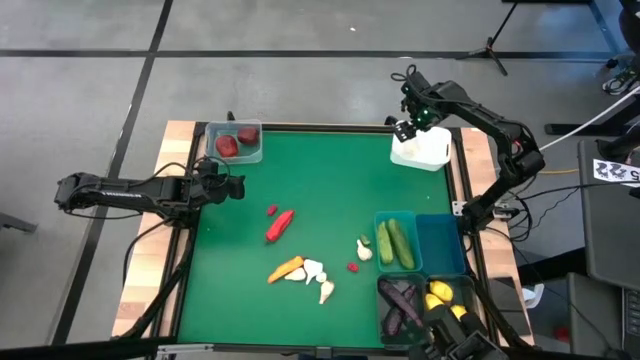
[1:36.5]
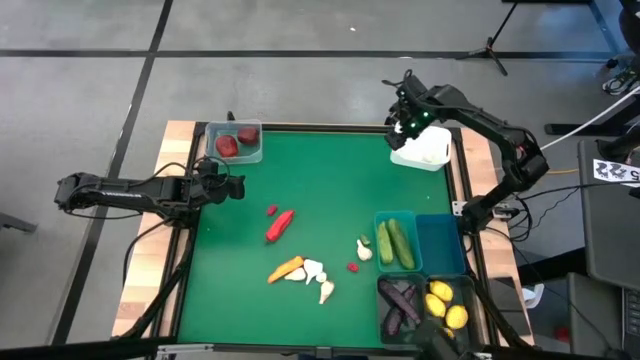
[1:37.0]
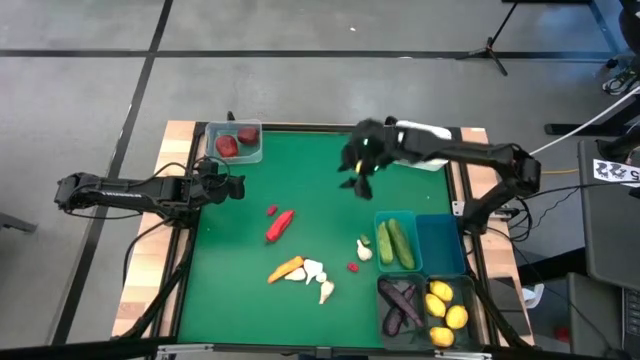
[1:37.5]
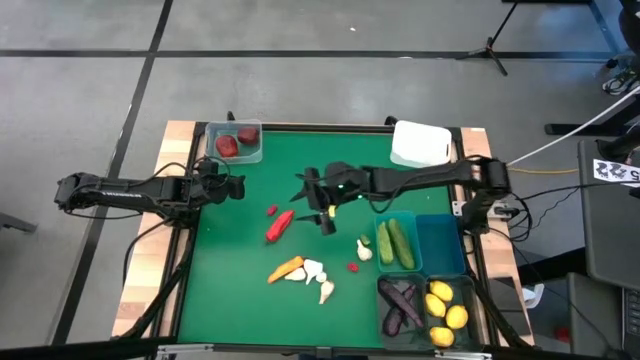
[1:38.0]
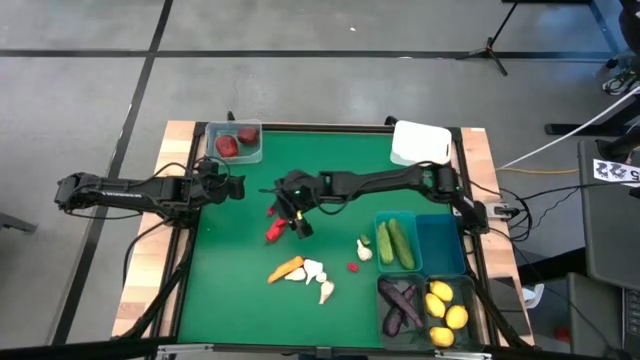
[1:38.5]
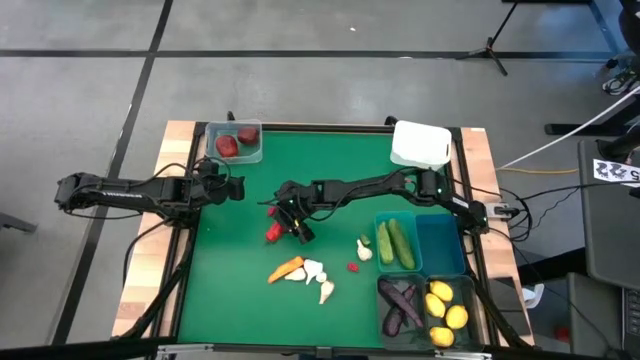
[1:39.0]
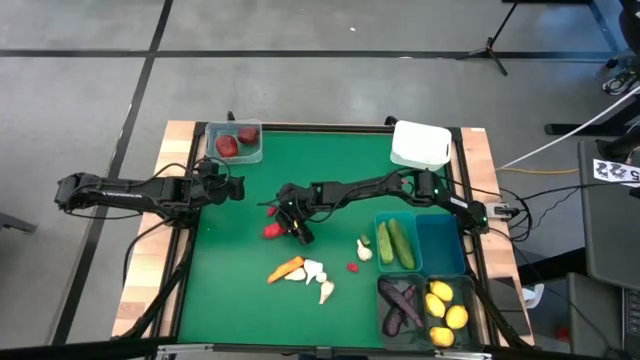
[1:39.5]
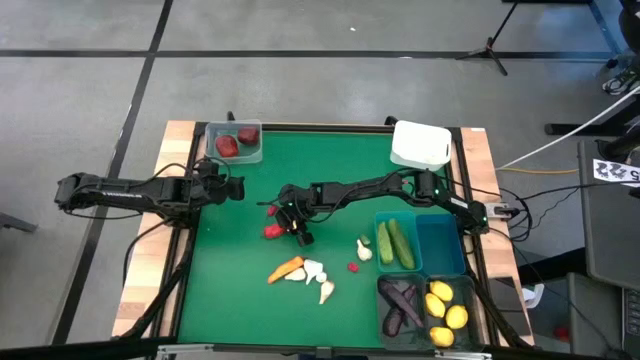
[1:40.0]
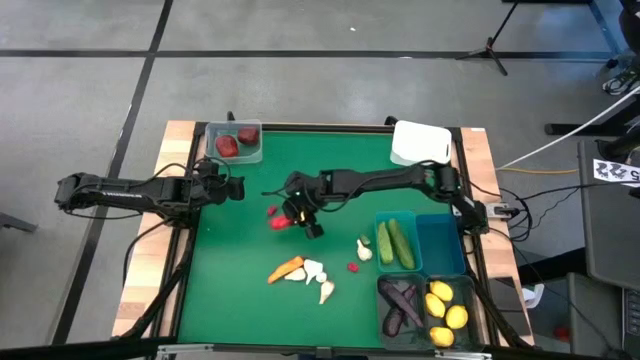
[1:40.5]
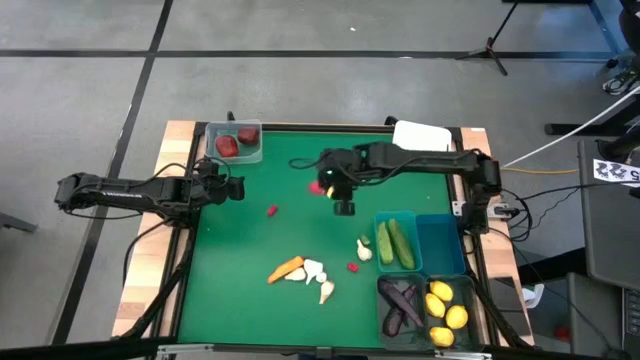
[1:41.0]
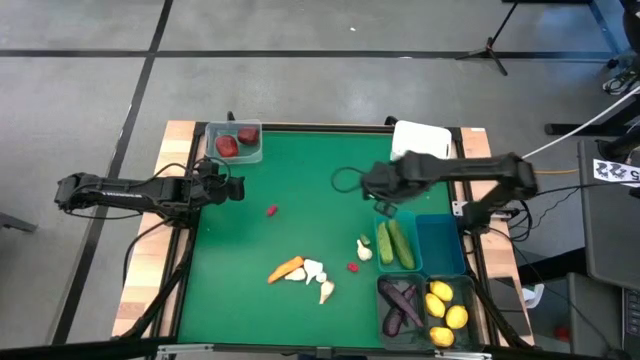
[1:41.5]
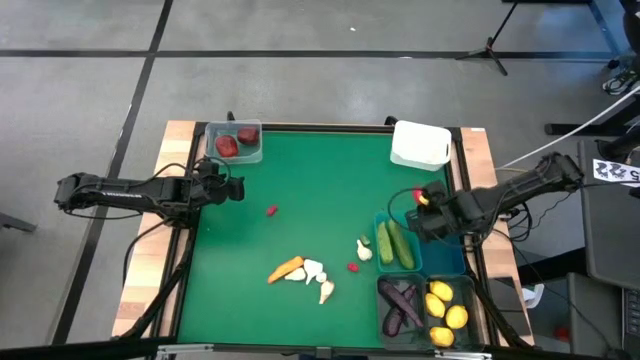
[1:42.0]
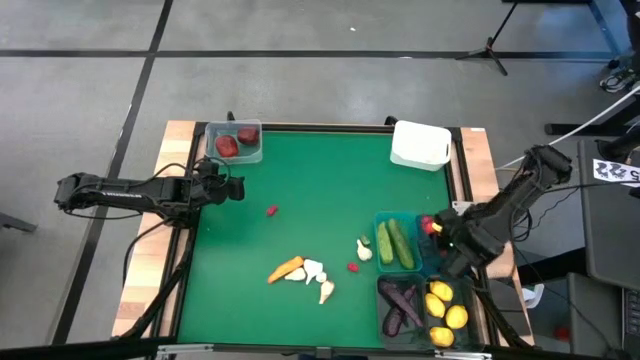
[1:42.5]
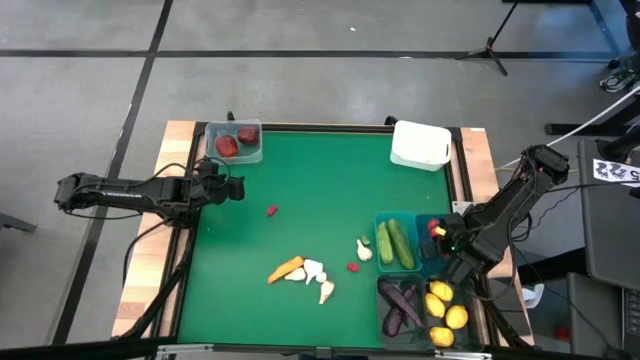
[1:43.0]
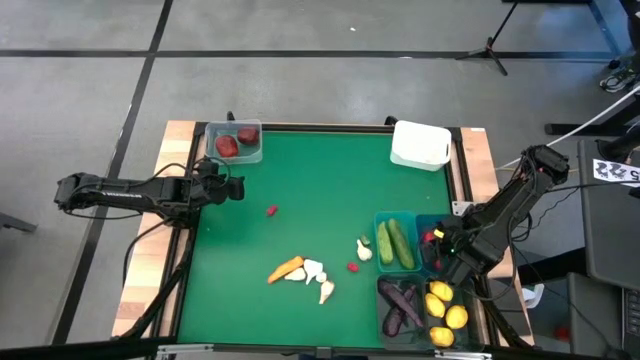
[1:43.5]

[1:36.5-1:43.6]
Task: Sort produce into baskets
Put the red pepper into the blue bin

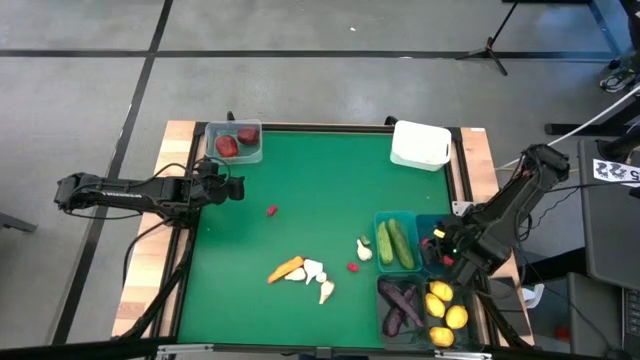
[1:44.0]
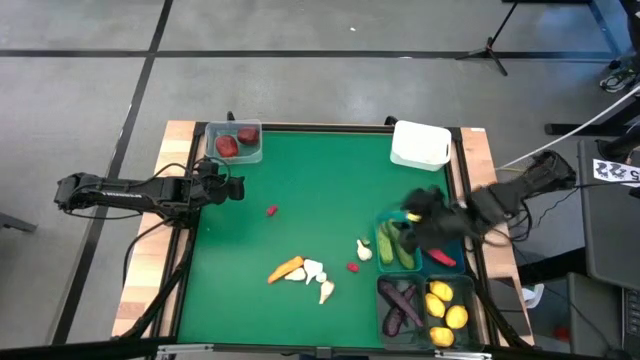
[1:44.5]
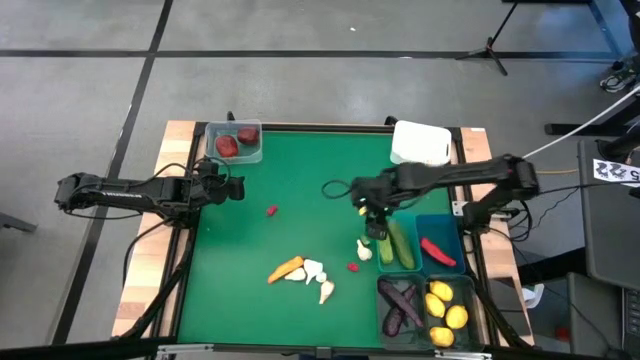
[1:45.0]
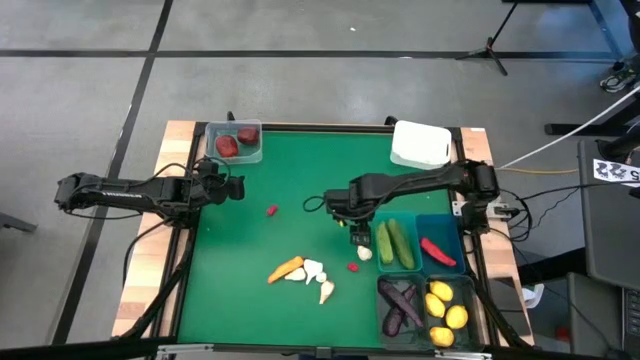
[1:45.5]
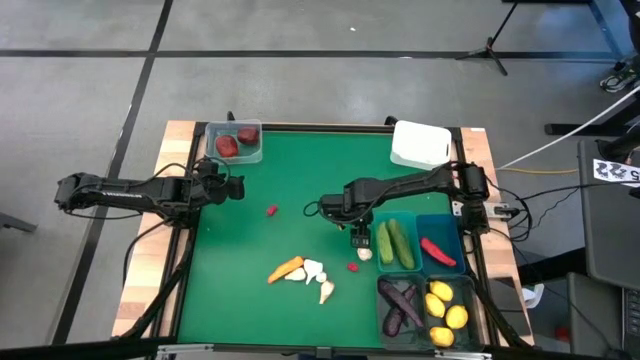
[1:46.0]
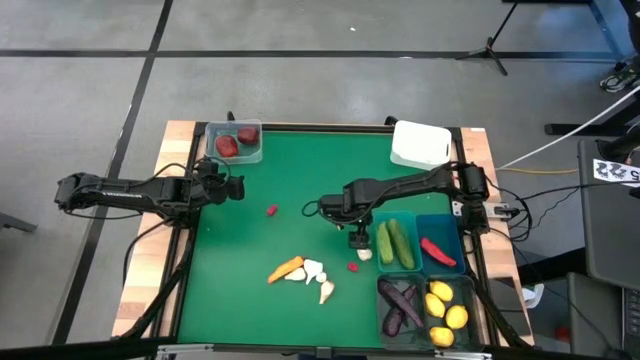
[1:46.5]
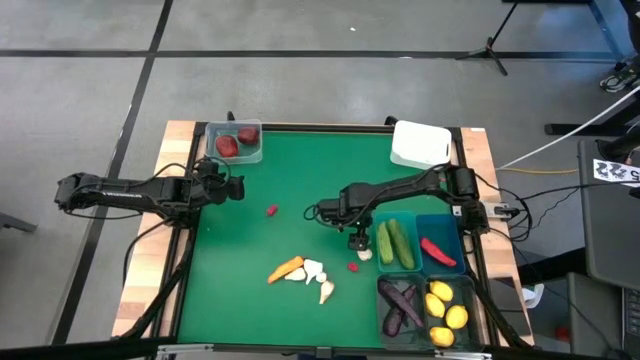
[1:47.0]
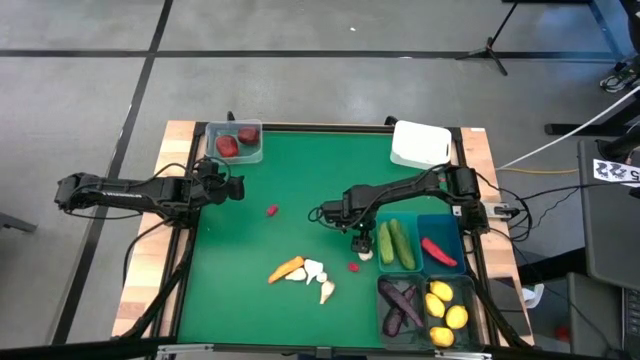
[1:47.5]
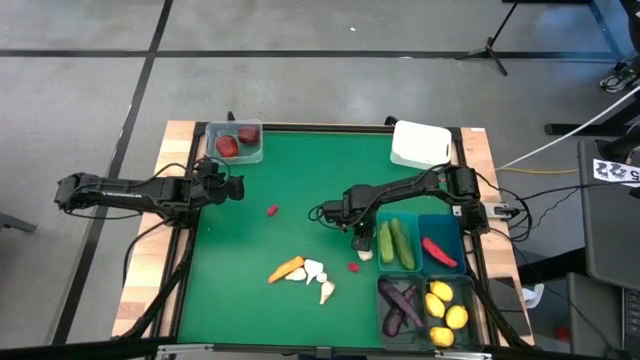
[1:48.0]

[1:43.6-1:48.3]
Put the green bell pepper into the blue bin

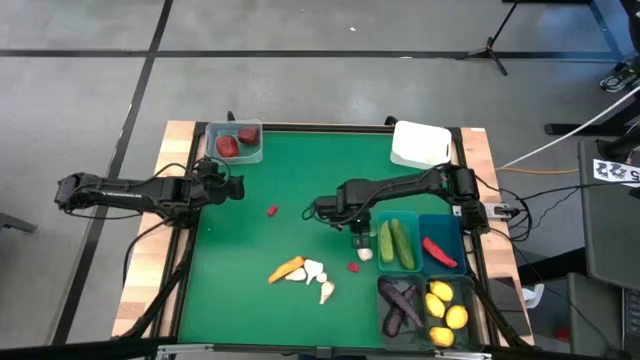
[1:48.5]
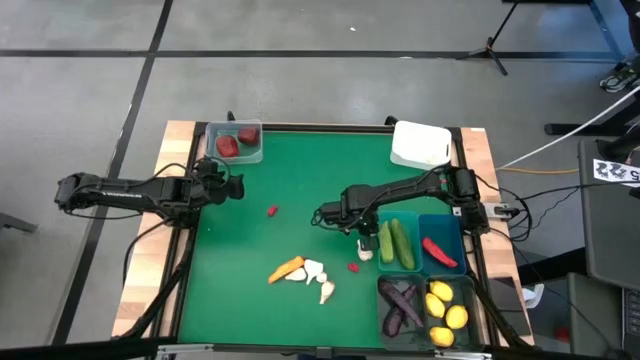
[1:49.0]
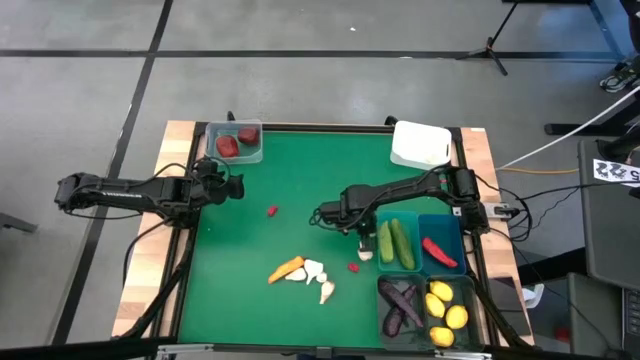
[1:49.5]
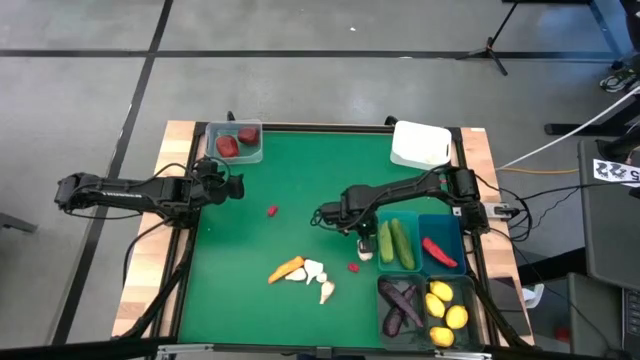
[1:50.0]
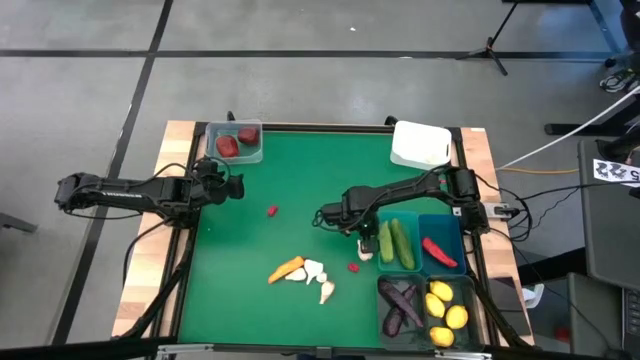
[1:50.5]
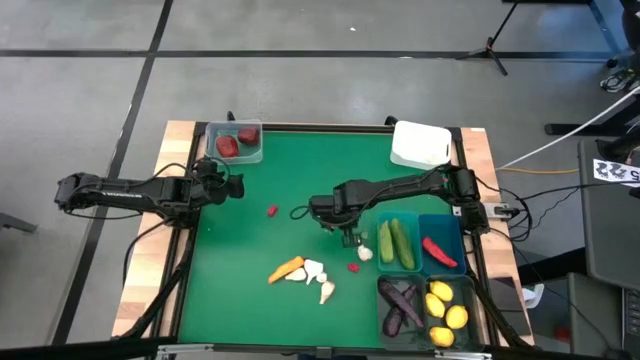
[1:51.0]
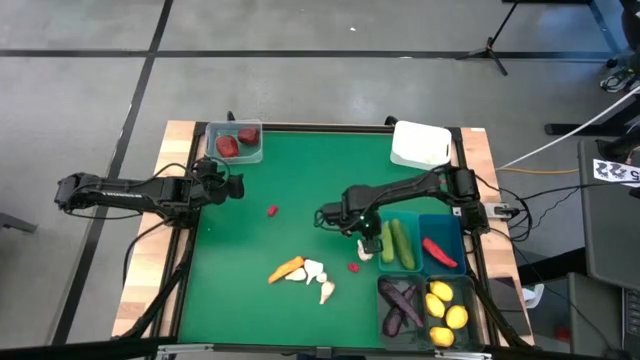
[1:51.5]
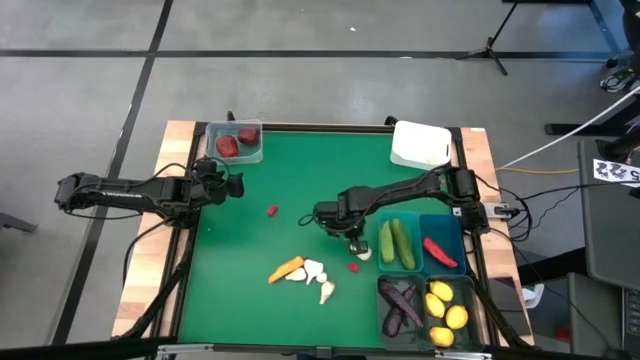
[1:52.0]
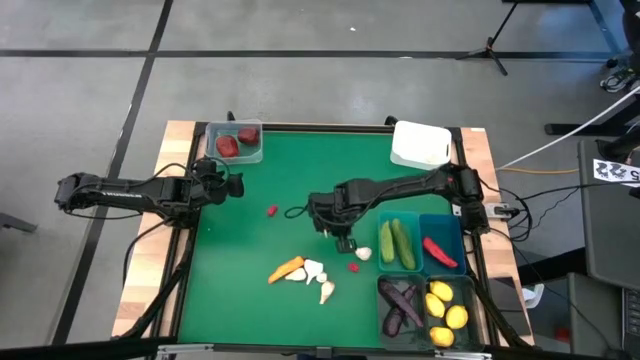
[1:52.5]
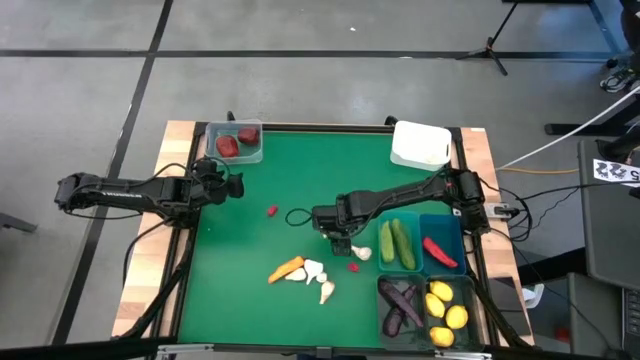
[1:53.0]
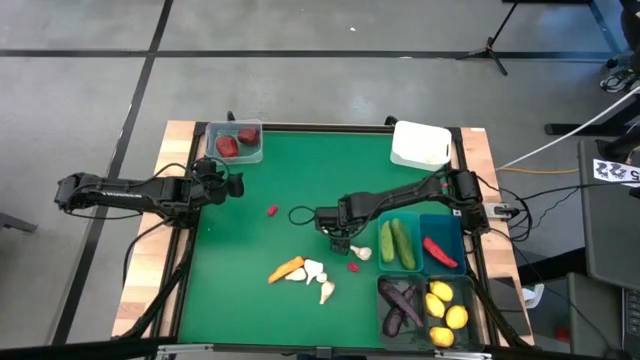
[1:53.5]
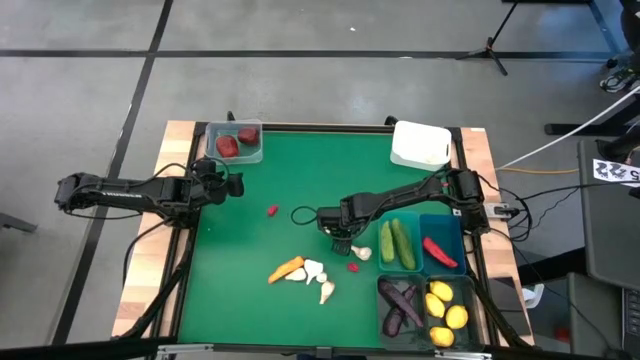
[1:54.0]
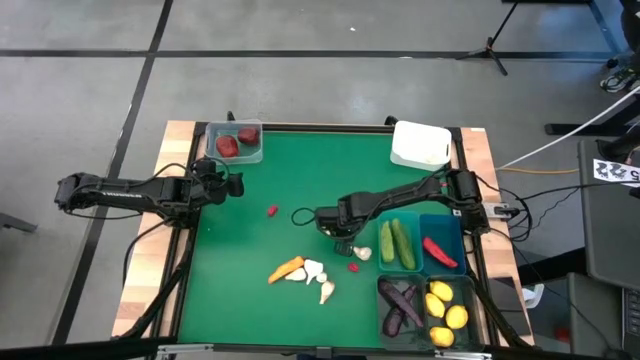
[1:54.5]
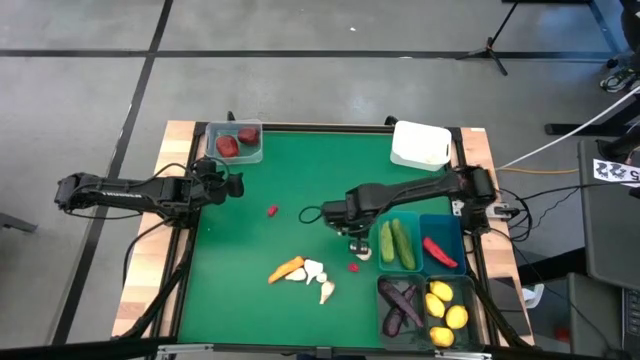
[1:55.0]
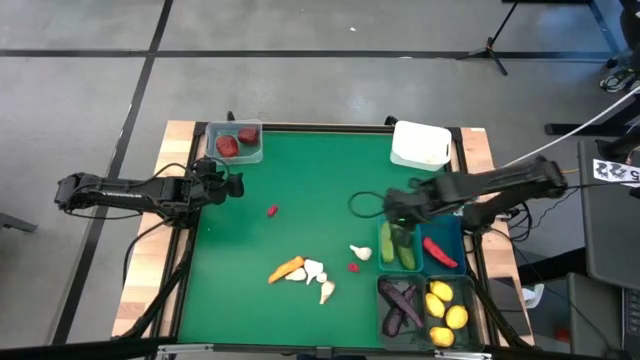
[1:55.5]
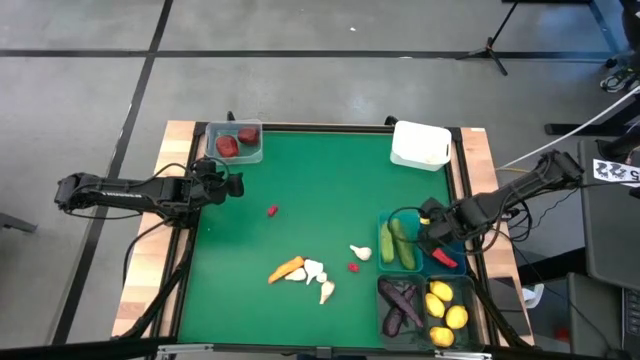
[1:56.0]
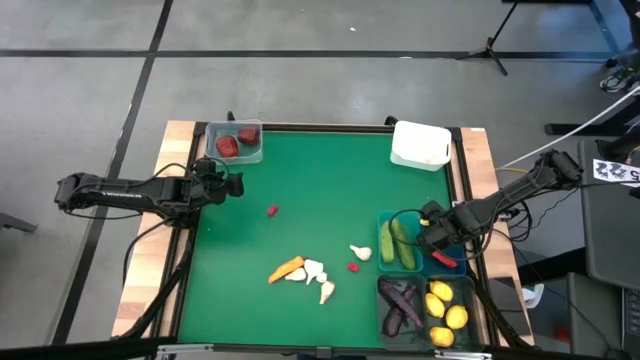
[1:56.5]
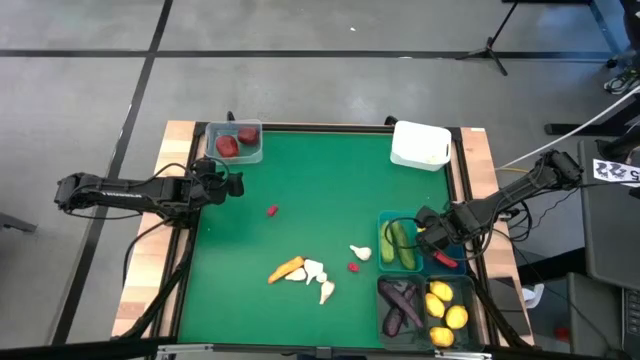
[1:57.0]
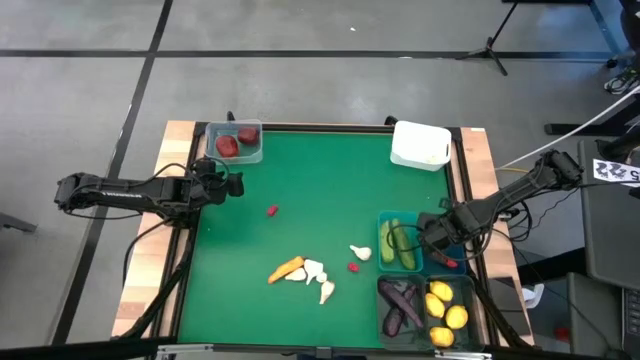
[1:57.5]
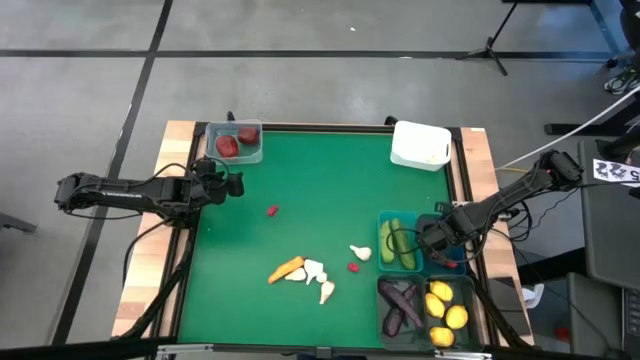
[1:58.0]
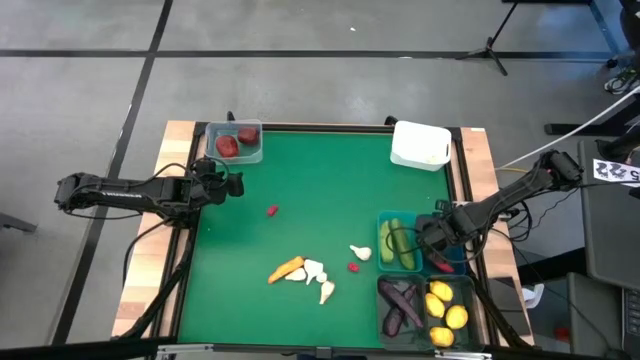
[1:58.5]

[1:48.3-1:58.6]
Put the green bell pepper into the blue bin
